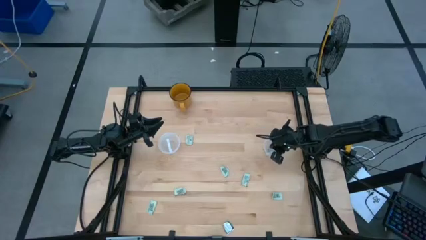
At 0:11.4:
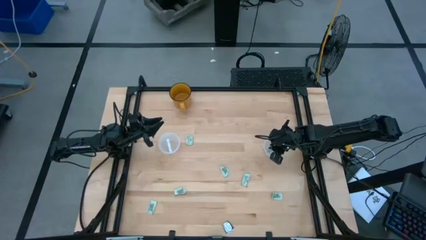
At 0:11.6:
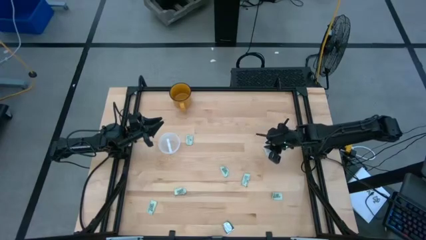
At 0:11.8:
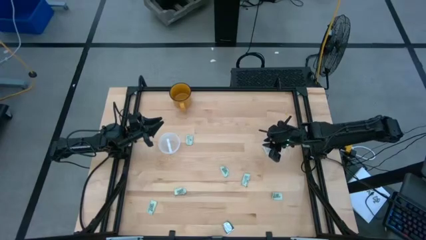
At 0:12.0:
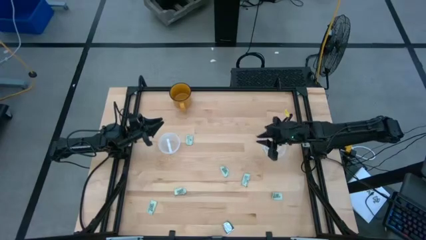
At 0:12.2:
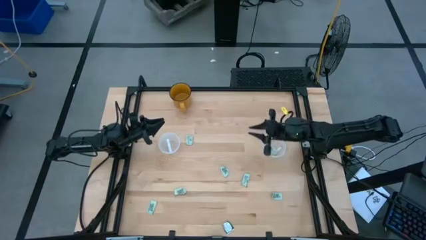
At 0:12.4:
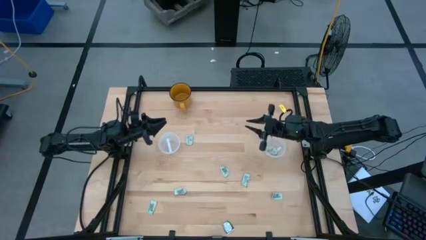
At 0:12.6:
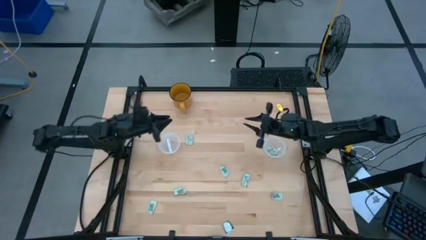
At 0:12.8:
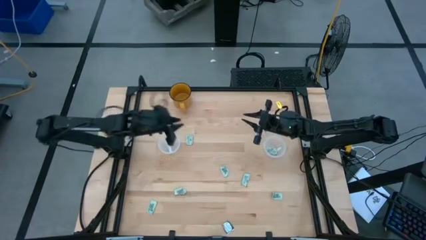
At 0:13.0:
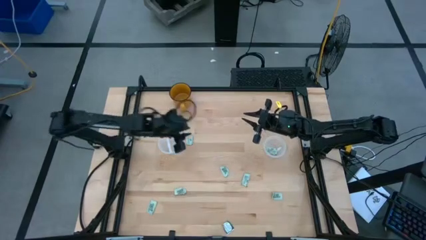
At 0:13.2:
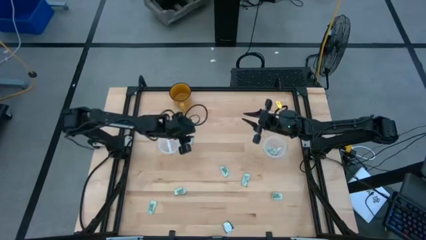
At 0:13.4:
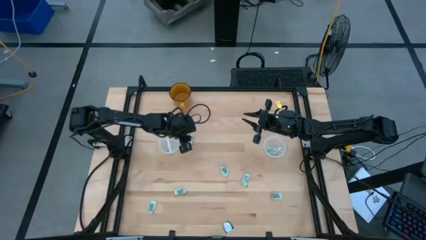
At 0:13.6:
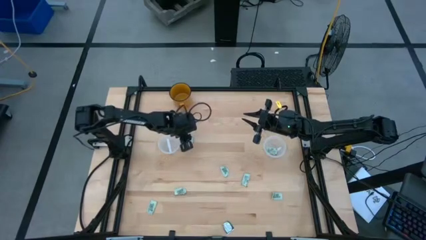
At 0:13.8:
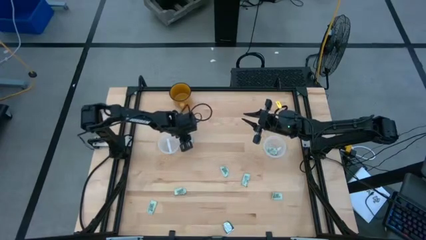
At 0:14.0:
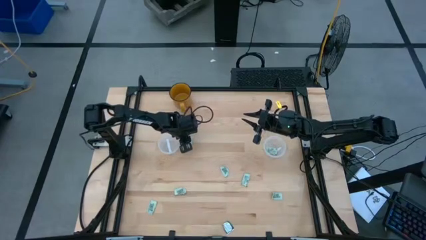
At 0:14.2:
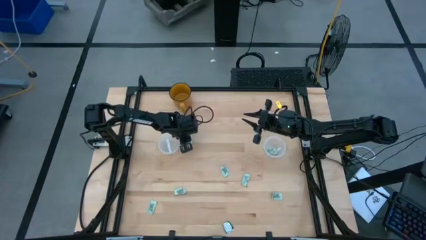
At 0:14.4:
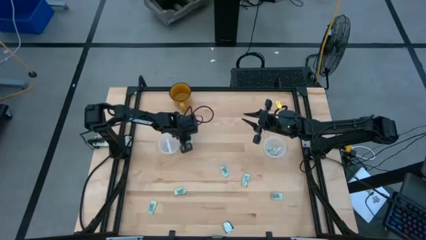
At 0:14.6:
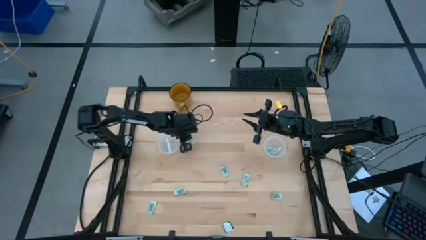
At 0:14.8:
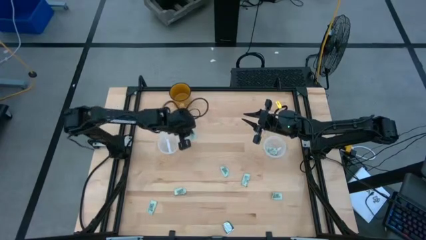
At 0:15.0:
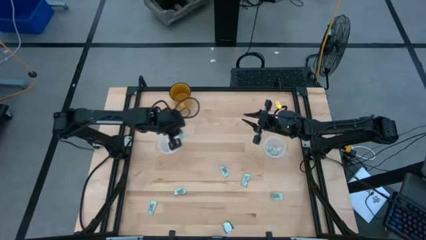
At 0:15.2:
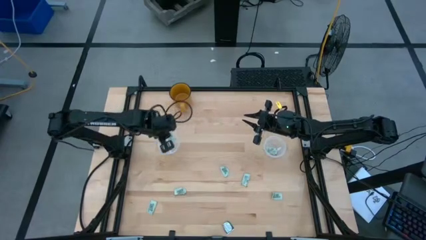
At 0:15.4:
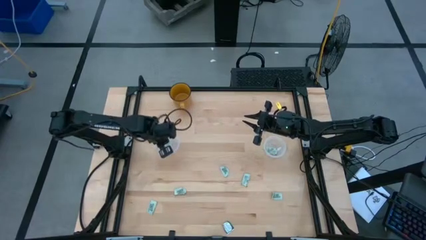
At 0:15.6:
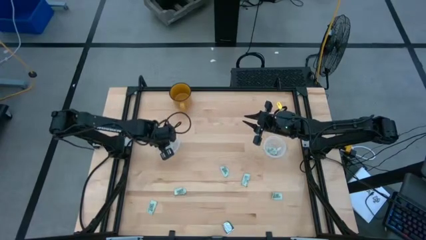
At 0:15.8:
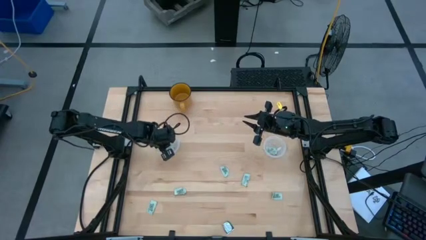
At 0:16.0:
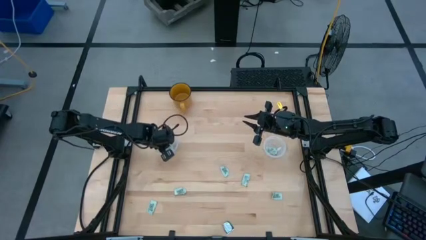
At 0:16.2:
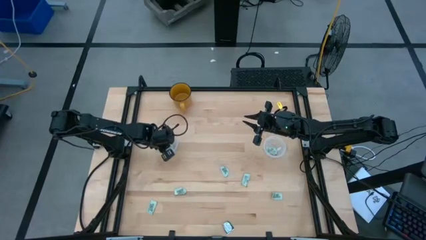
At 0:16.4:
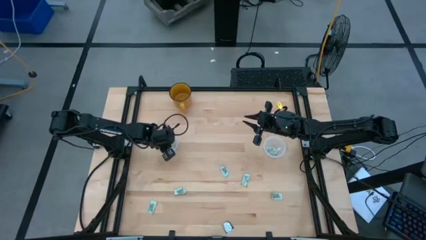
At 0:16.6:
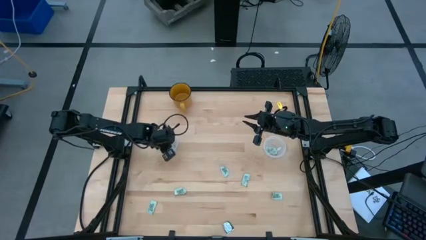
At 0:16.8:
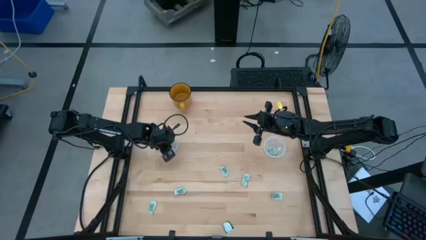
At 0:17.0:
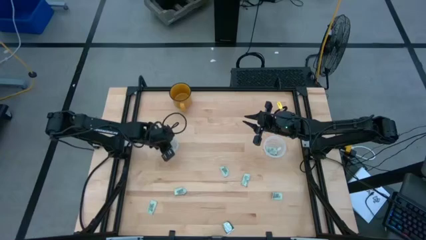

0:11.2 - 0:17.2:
Task: Pick and place items into bin
Put the stevia packet into the left transparent bin

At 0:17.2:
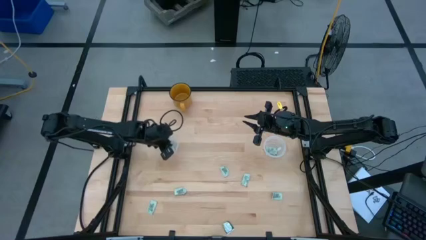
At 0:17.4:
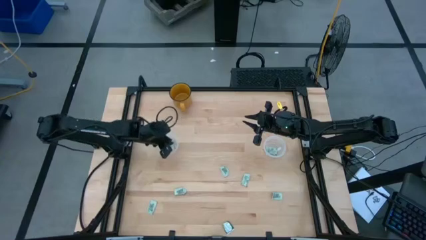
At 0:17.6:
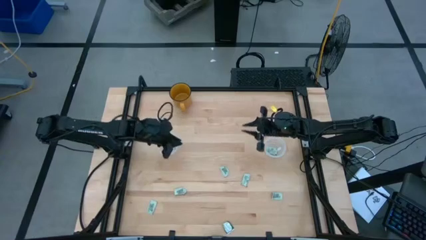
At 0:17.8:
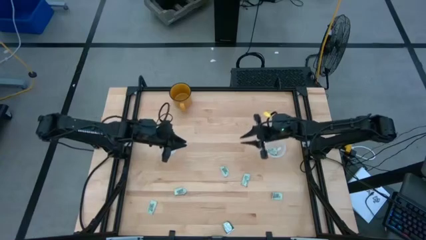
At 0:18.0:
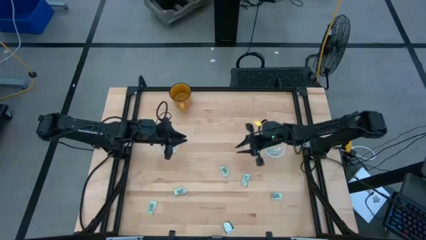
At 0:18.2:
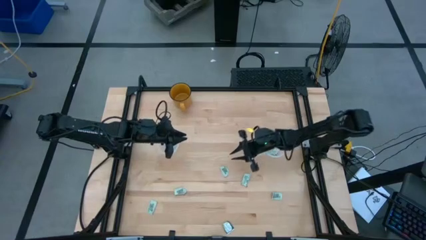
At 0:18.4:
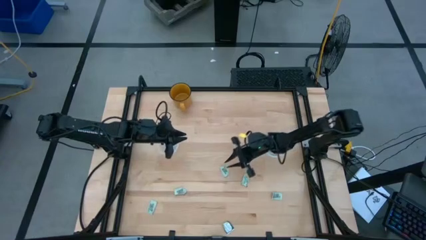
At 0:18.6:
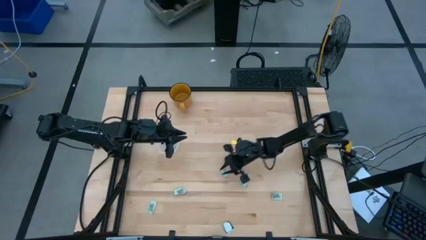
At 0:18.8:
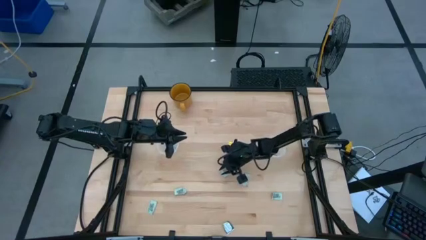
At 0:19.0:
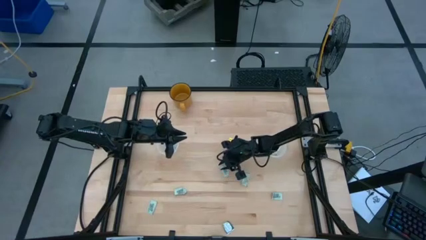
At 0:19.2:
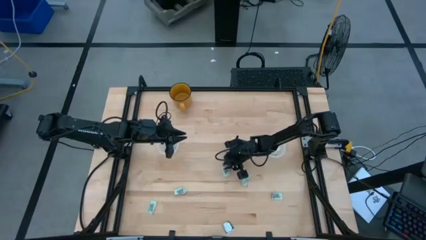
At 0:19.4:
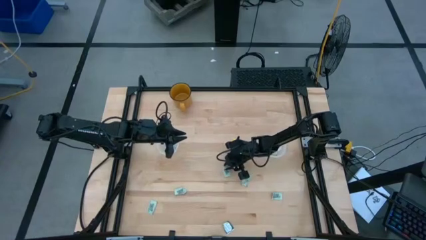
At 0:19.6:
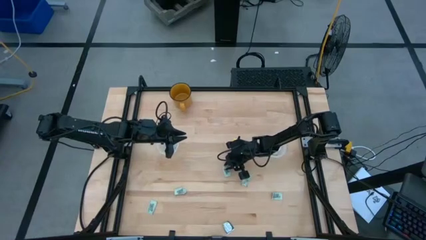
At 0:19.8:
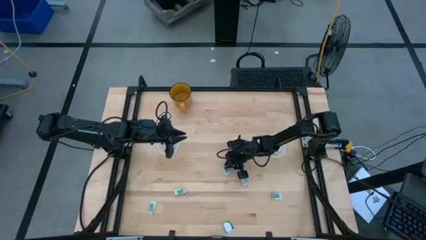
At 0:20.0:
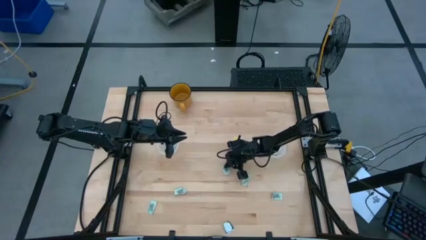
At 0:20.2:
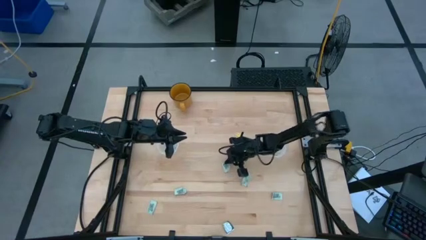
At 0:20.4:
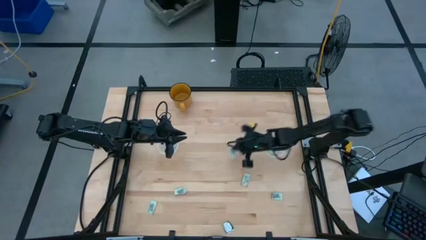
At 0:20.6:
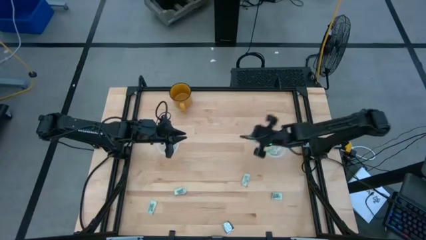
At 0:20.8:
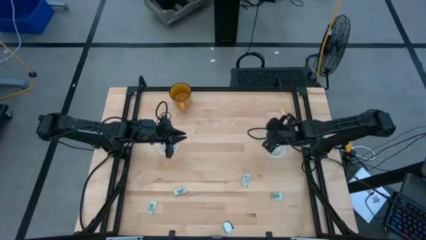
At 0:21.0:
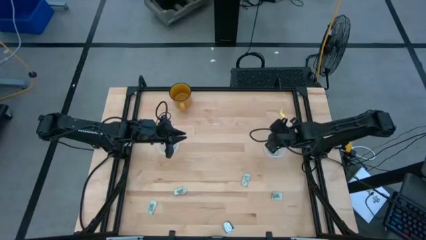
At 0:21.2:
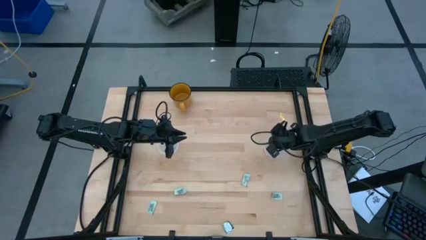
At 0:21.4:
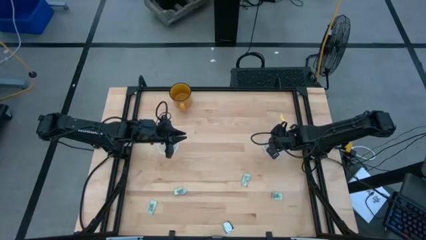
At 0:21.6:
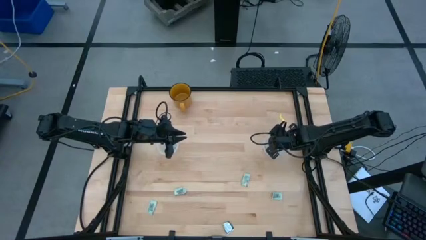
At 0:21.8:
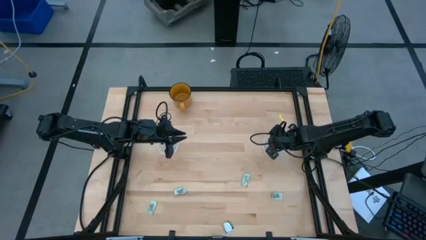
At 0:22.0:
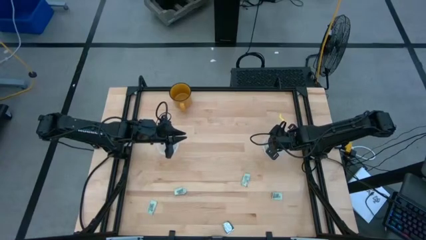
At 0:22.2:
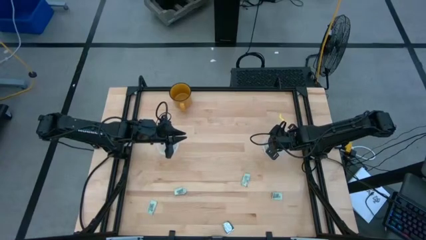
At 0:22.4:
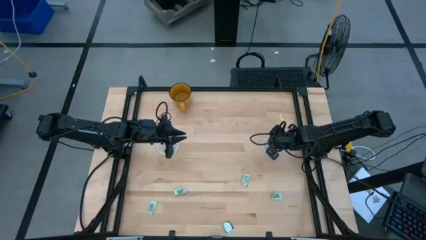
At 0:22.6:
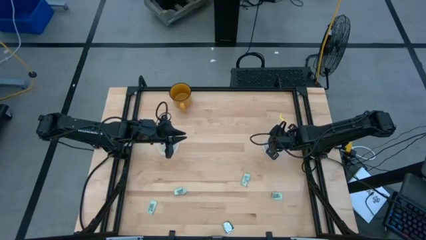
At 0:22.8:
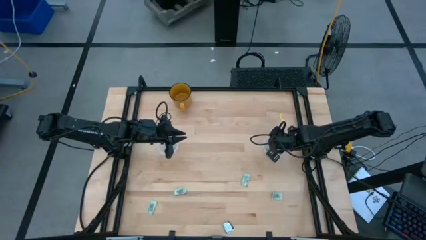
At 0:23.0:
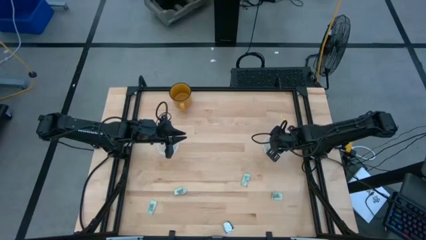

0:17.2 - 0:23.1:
Put the stevia packet into the right transparent bin

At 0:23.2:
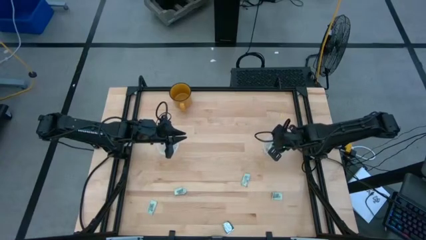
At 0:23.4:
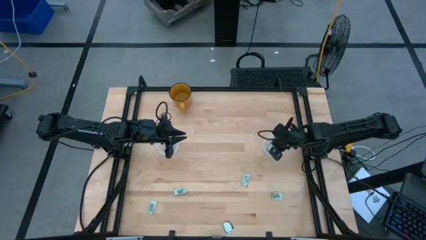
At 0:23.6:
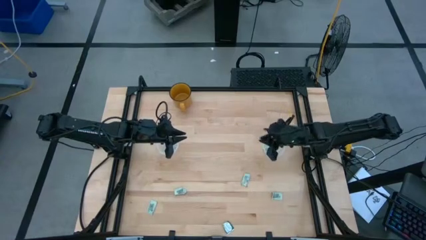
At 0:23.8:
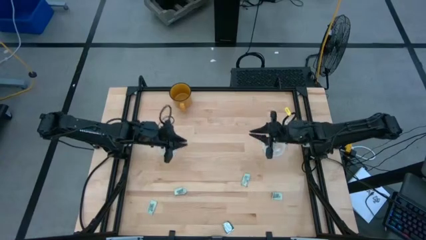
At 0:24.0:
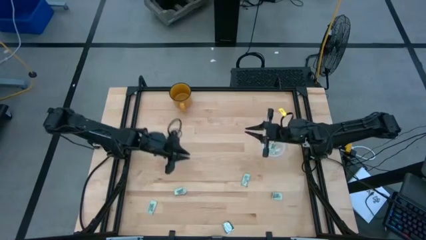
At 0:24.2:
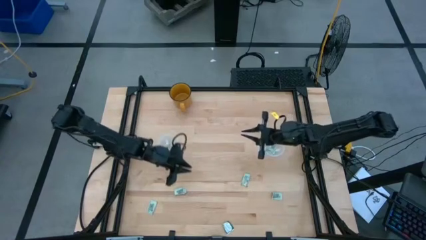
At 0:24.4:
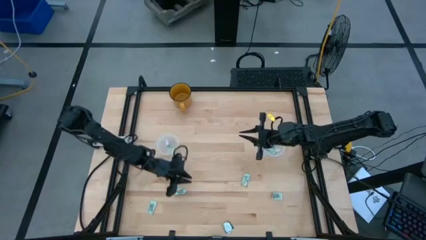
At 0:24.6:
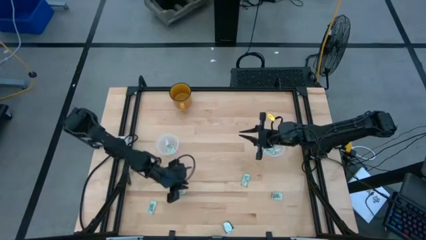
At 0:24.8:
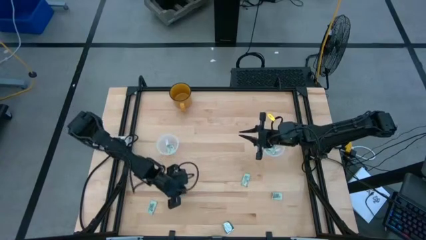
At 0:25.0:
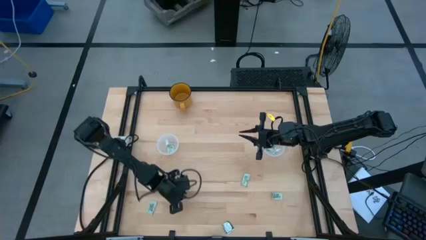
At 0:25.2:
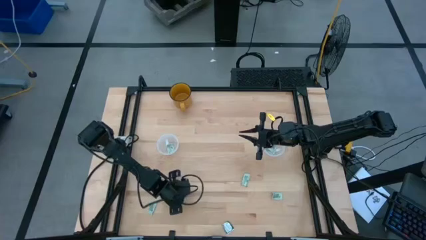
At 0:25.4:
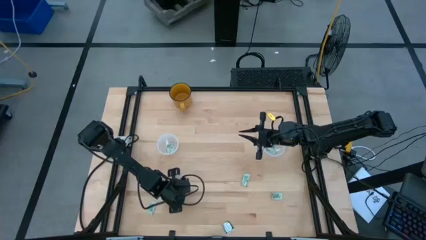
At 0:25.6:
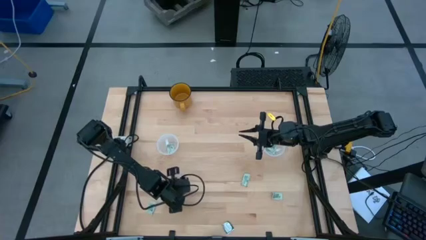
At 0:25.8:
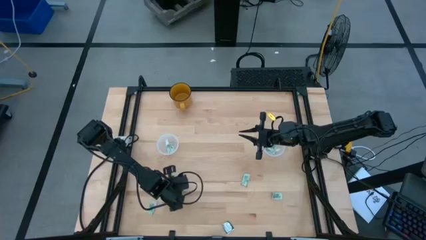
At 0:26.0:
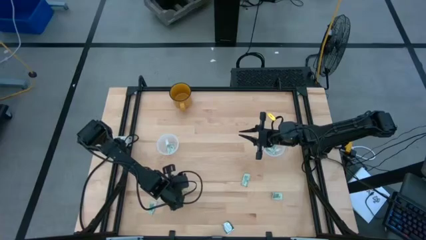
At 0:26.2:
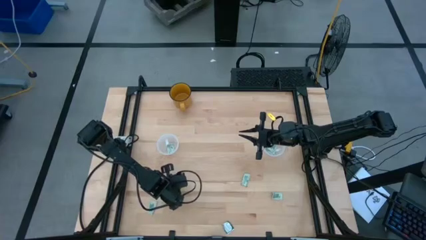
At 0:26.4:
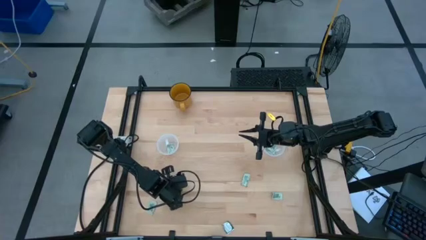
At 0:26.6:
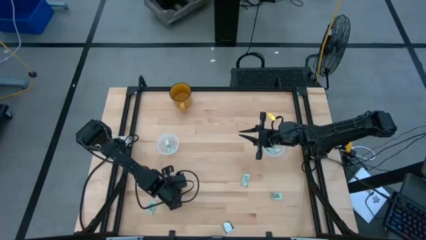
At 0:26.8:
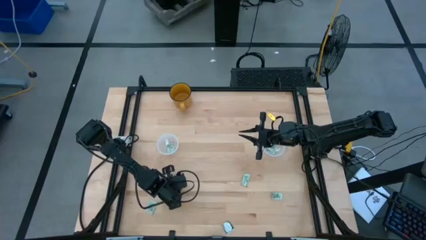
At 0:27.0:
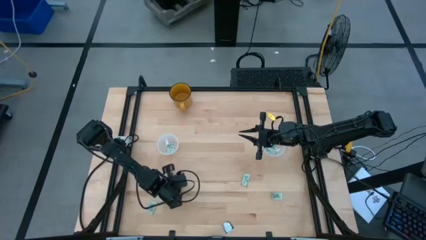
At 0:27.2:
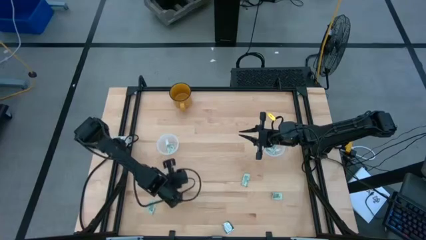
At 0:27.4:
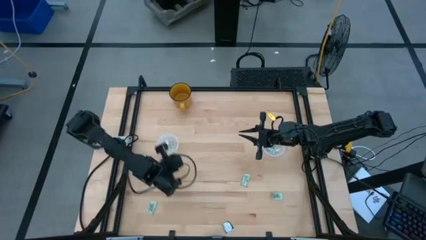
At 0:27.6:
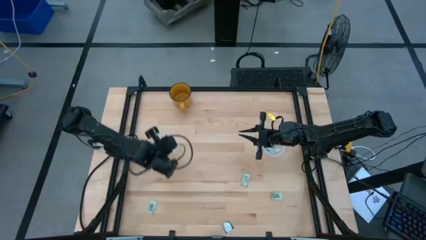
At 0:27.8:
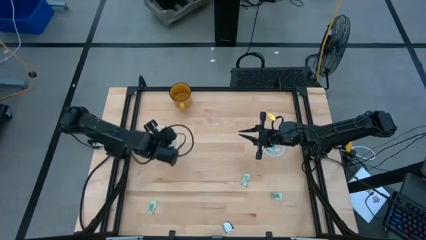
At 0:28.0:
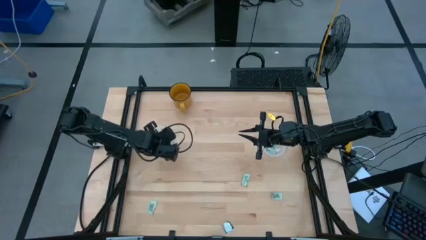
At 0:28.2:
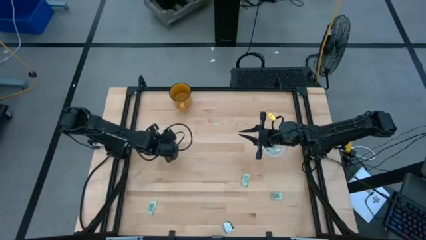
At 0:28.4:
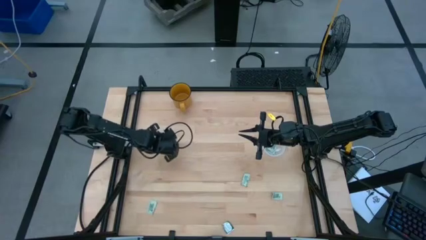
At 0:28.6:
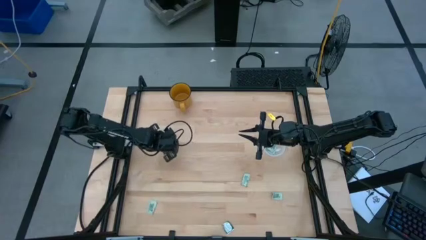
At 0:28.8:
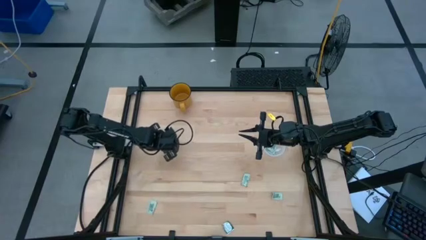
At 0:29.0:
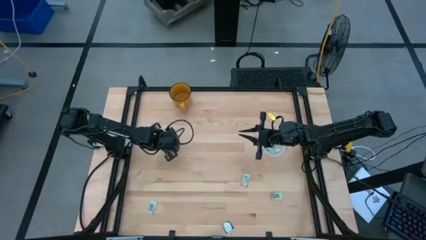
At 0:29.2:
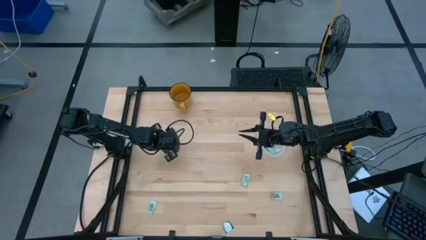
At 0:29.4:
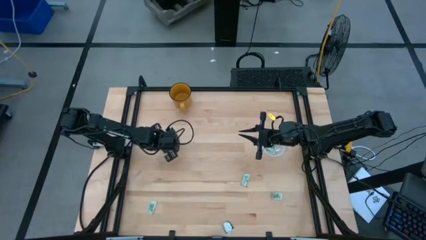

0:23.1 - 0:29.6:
Put the stevia packet into the left transparent bin
